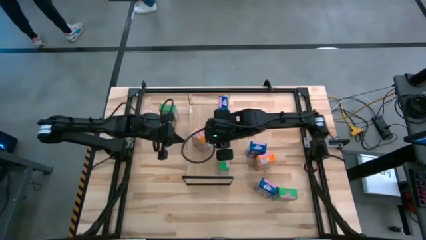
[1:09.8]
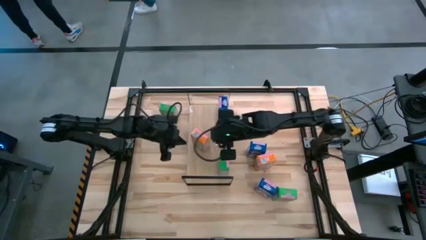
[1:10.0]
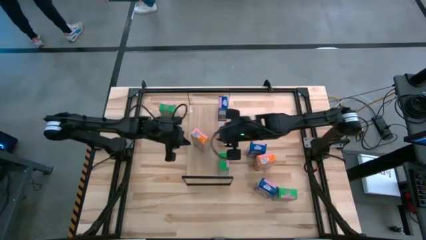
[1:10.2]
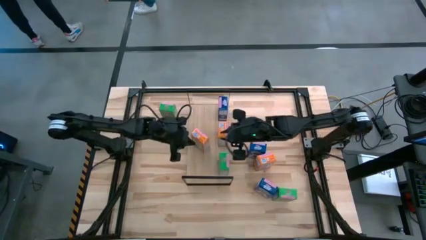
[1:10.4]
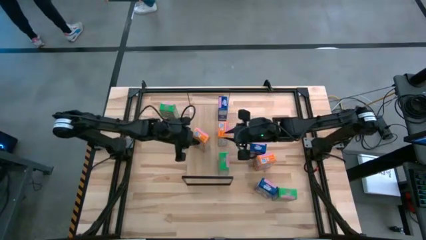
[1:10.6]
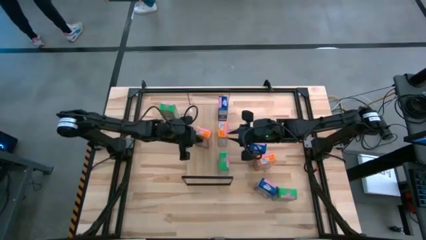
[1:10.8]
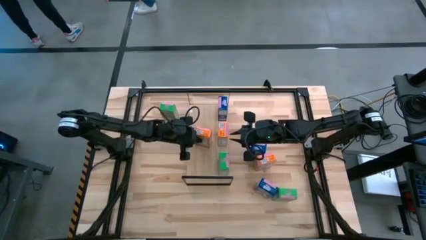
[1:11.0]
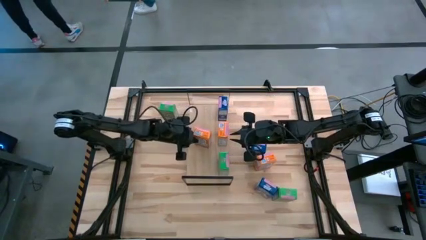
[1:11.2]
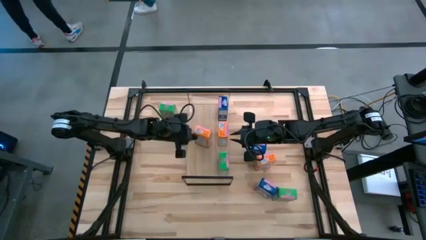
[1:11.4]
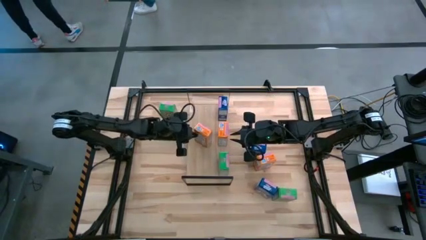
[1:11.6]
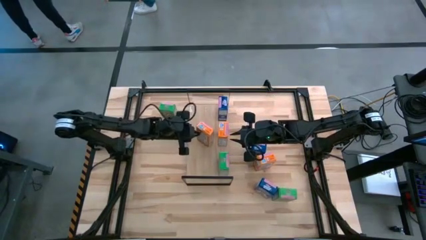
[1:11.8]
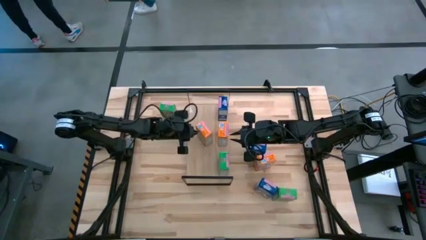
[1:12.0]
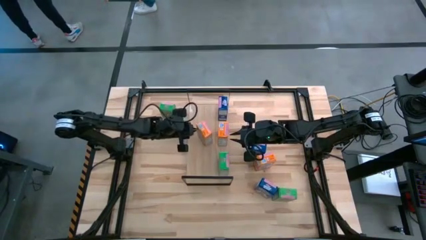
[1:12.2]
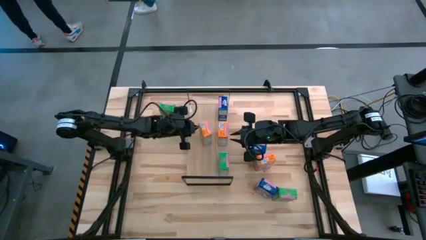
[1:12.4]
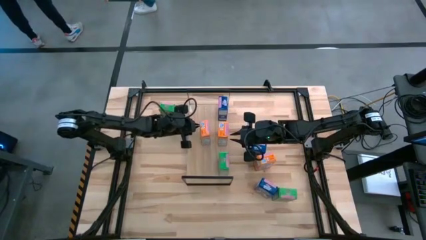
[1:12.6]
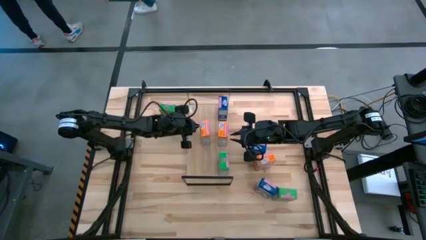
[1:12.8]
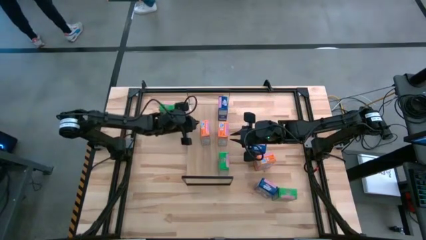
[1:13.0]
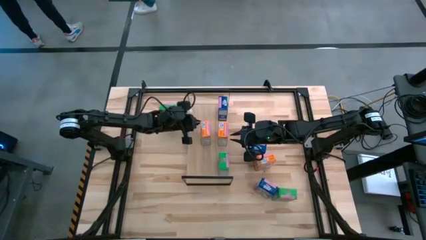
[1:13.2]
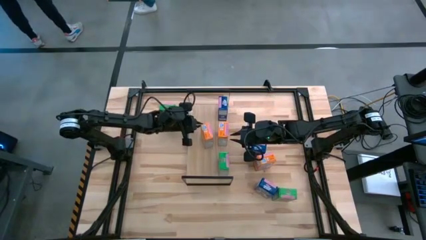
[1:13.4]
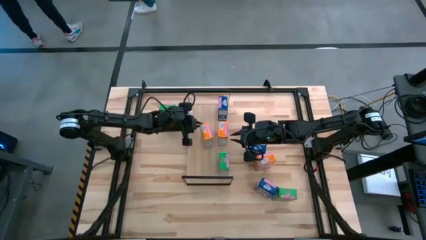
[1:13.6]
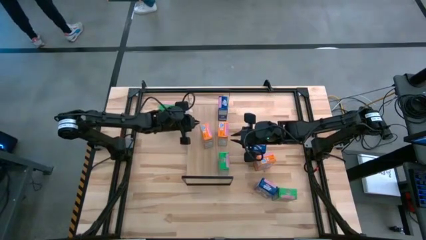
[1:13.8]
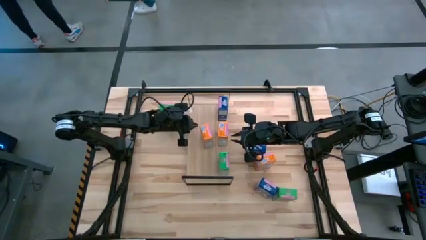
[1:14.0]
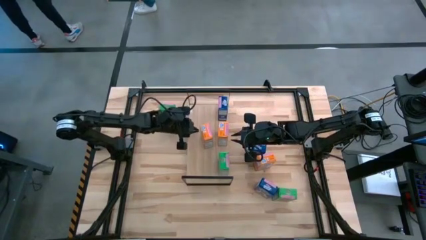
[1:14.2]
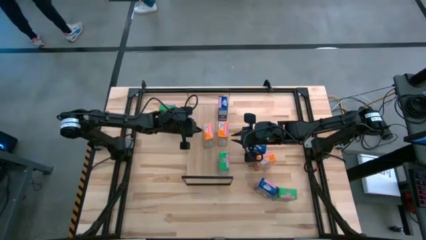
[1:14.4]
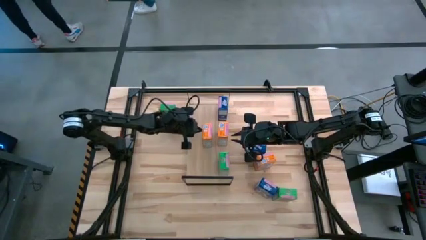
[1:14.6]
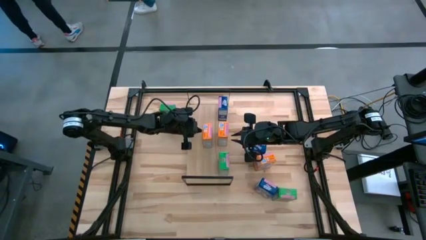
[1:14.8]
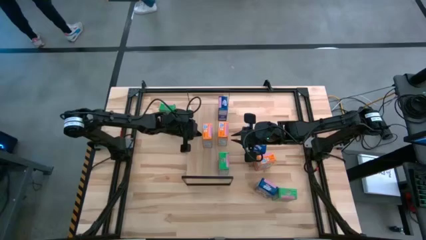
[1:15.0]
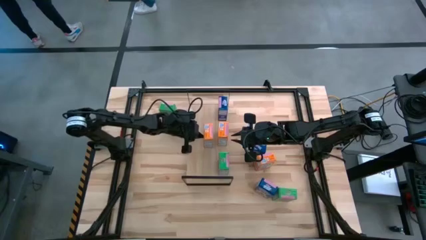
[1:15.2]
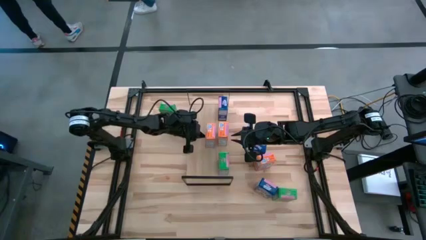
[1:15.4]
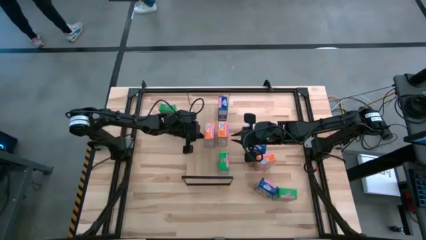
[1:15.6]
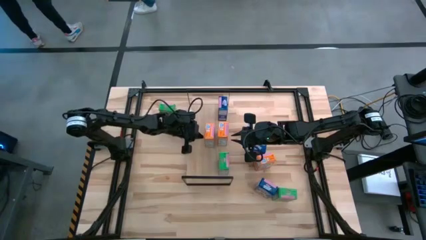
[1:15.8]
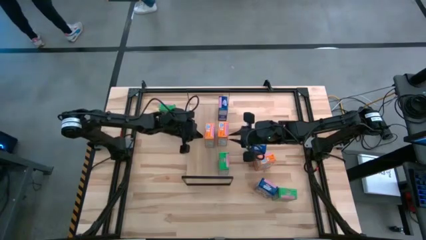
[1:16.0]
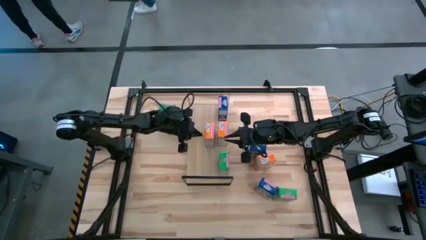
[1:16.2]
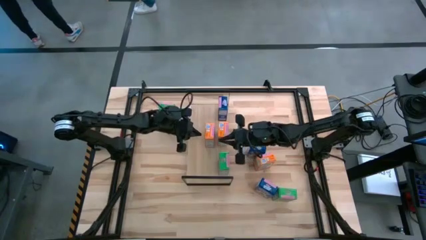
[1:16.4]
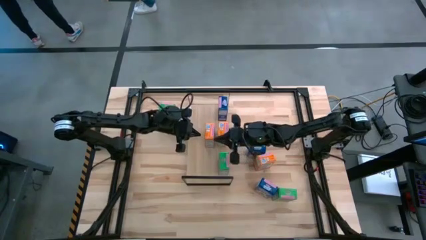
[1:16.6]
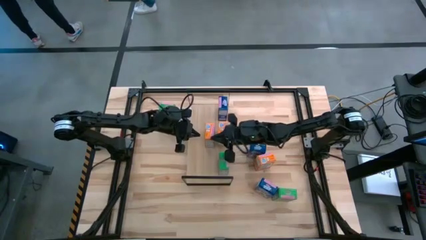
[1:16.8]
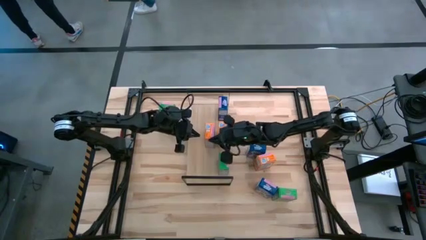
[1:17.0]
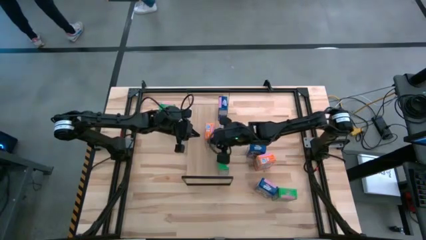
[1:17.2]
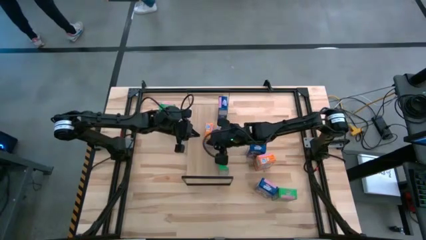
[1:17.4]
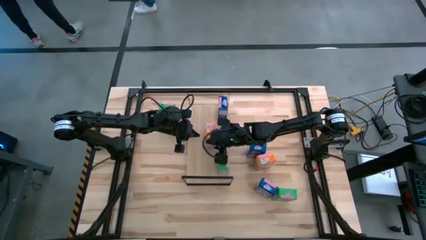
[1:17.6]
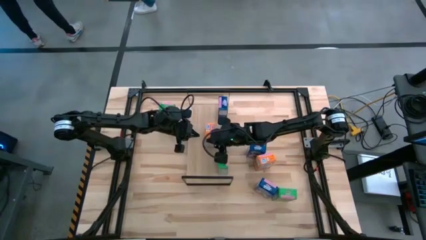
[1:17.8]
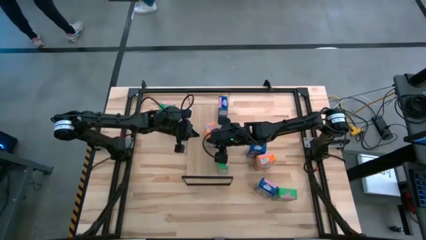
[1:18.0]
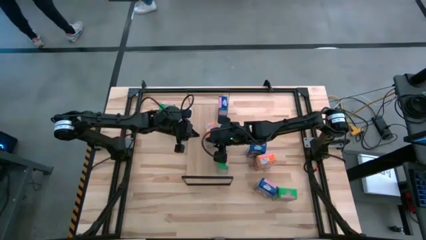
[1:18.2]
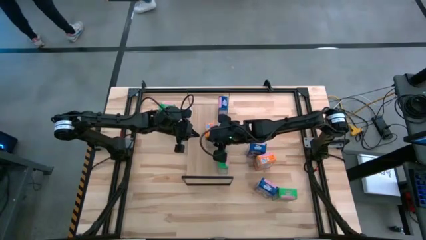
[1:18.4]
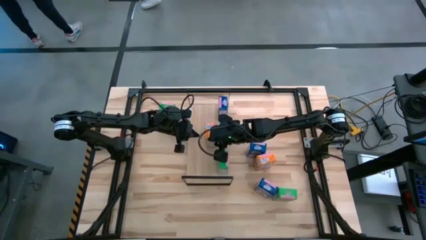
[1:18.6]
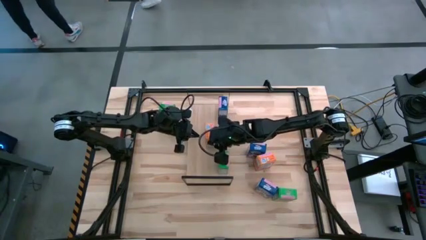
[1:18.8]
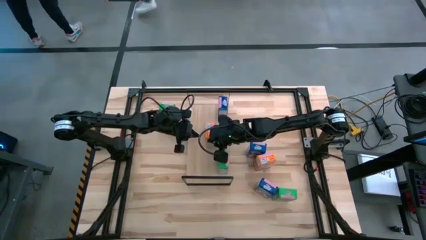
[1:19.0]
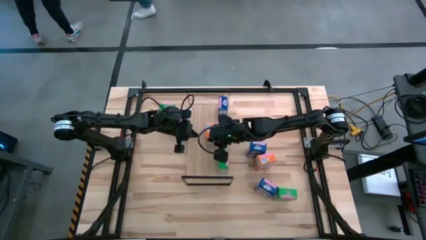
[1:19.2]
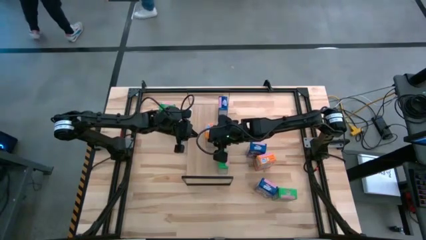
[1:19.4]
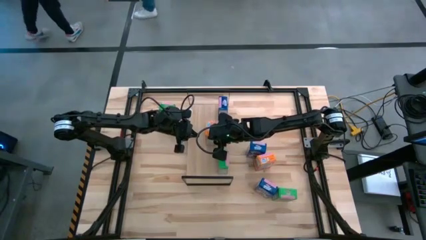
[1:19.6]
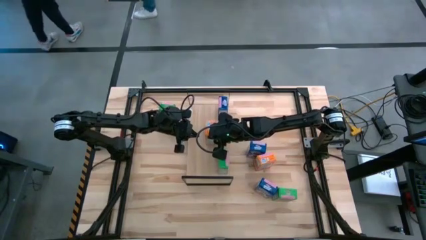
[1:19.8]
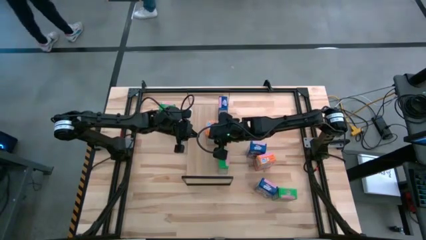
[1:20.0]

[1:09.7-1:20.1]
Task: Stack cereal on shelf
Put the top orange cereal box on the shelf aligned with the other orange cereal box

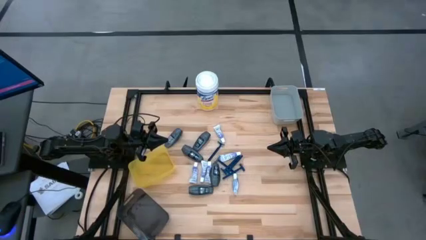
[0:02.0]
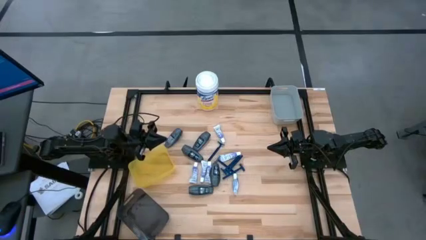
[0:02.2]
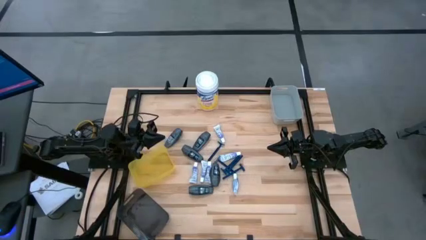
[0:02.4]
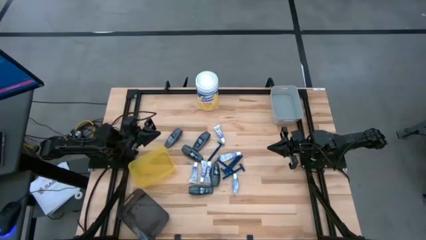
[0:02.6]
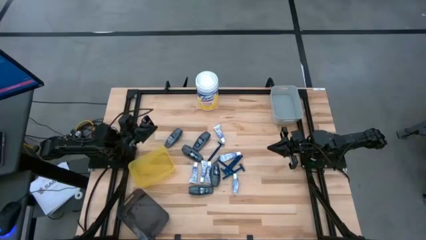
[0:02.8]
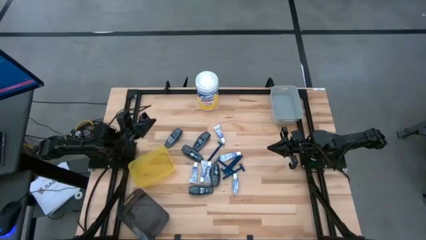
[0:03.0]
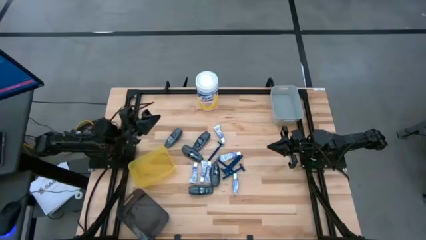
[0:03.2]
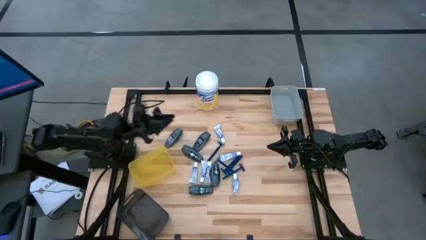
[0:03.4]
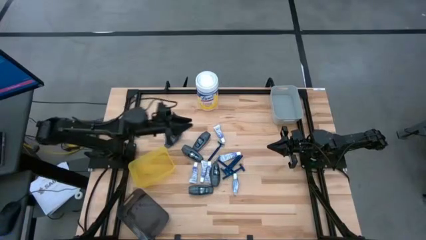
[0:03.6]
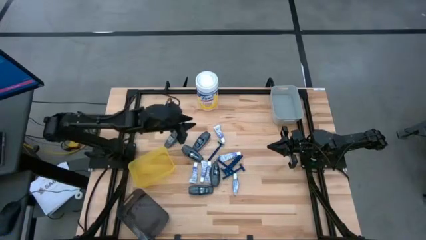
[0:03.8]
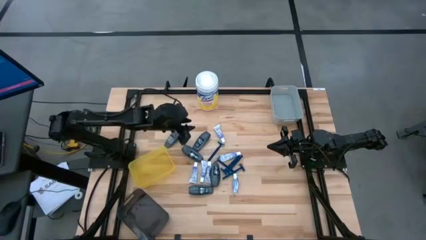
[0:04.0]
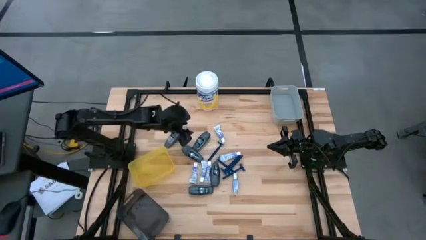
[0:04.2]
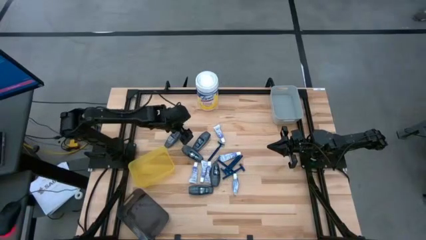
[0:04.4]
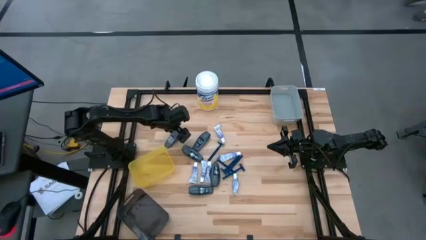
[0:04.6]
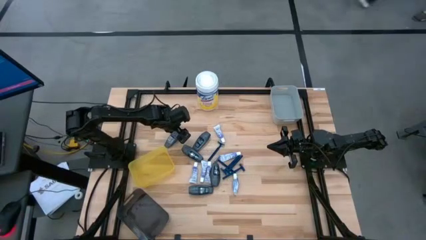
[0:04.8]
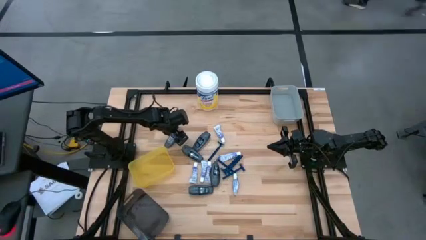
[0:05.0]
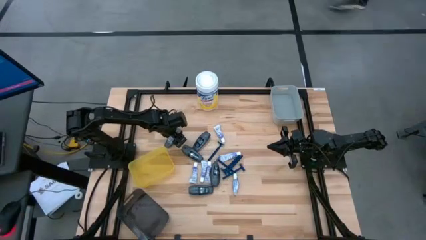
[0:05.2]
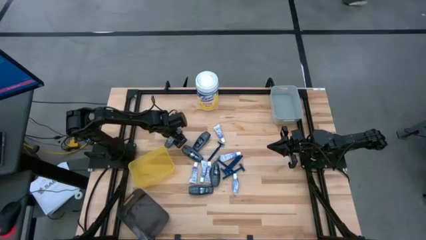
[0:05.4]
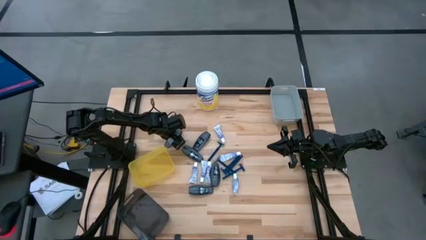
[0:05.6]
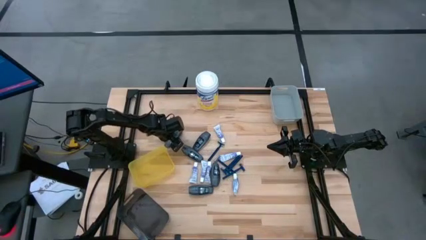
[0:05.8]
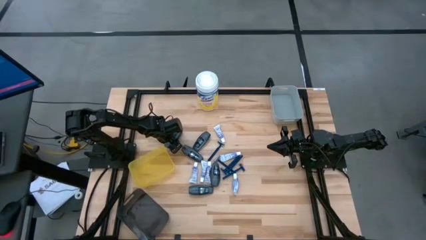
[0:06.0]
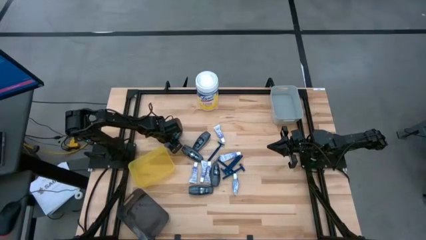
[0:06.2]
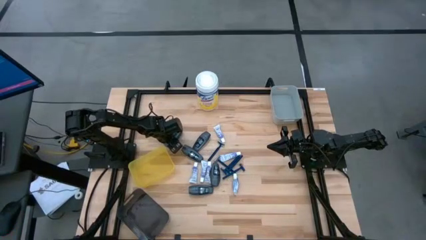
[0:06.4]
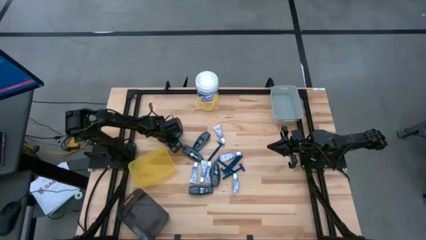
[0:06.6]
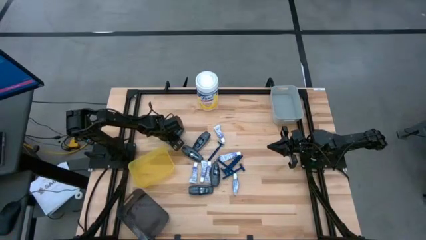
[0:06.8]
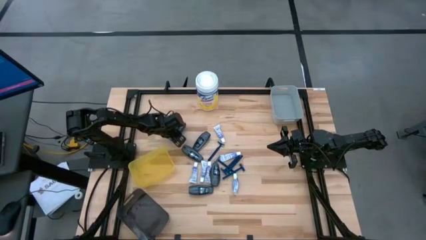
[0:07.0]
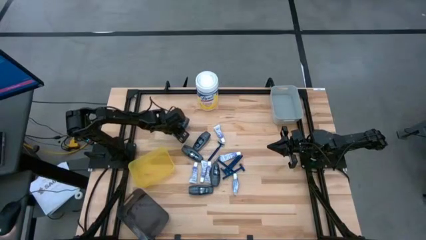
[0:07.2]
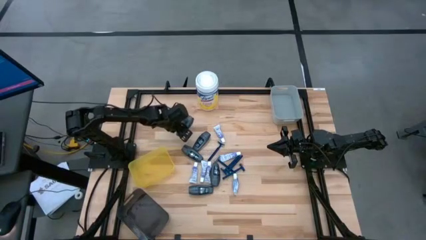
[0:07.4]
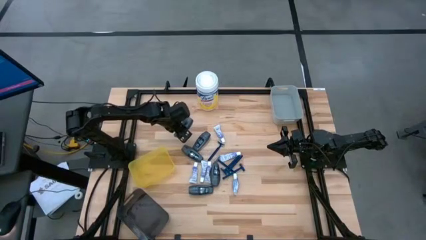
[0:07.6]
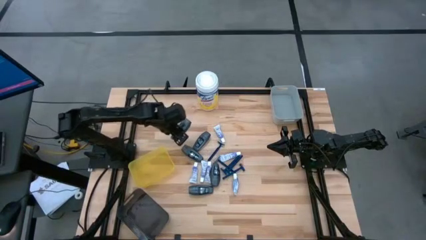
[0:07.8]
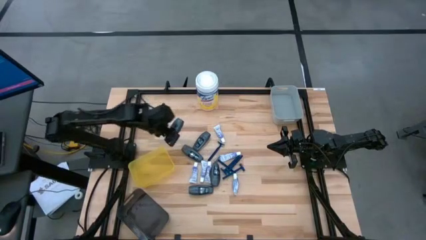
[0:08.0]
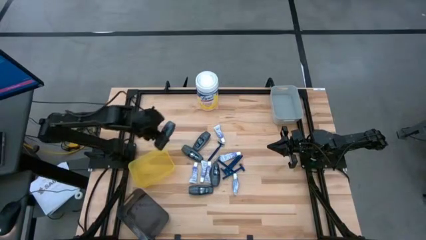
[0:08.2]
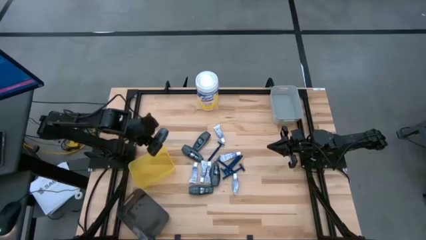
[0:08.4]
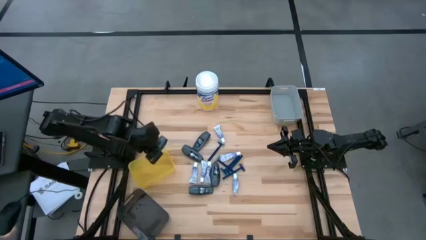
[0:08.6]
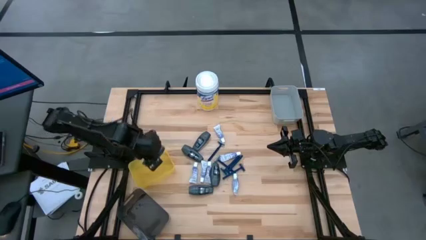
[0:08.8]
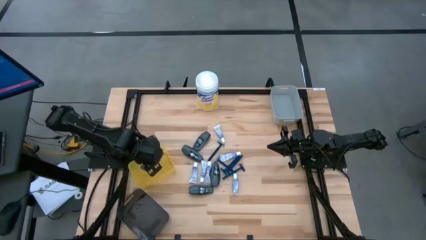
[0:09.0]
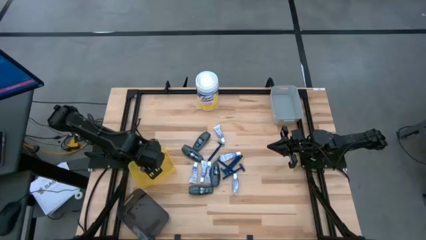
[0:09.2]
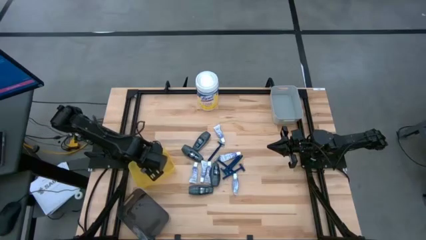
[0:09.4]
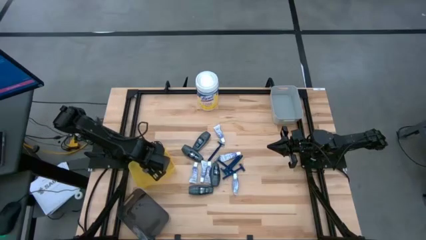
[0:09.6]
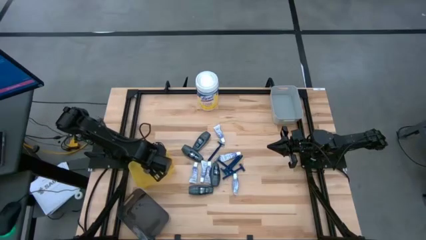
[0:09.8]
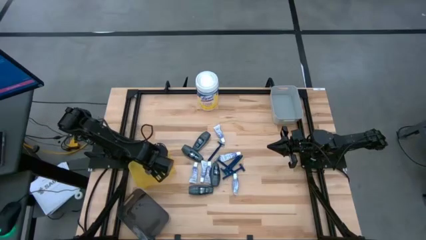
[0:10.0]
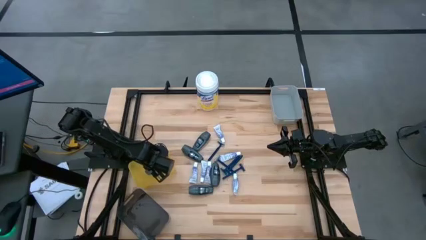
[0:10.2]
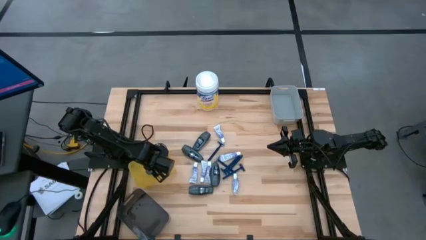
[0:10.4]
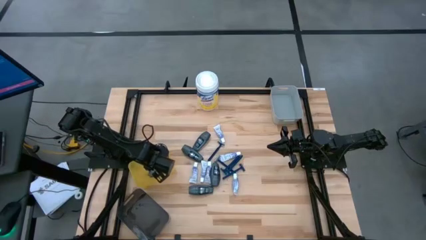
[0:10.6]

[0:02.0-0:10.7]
Task: Pick & Place Travel size toiletries
Put the black deodorant into the yellow bin
